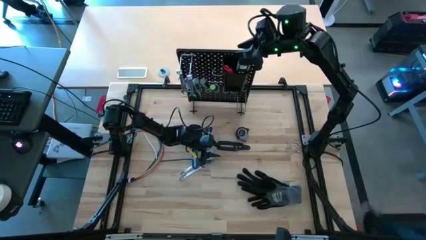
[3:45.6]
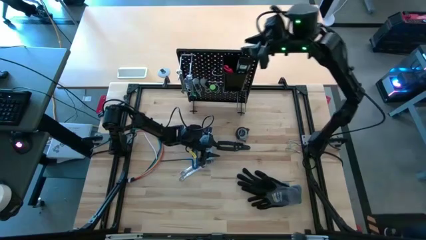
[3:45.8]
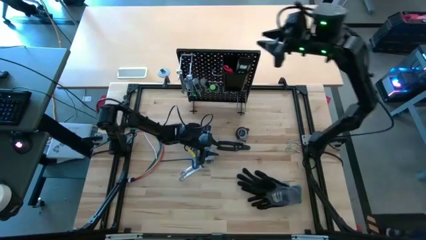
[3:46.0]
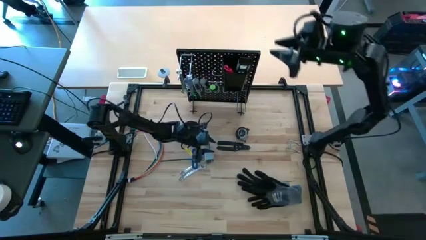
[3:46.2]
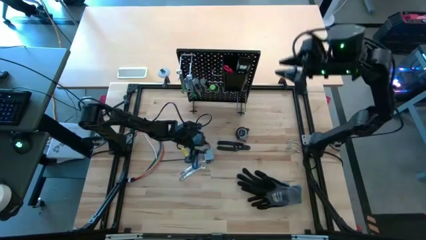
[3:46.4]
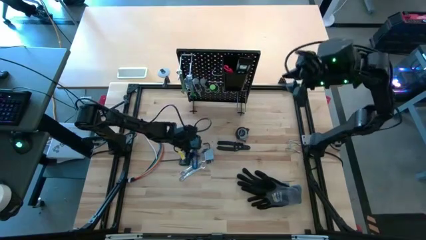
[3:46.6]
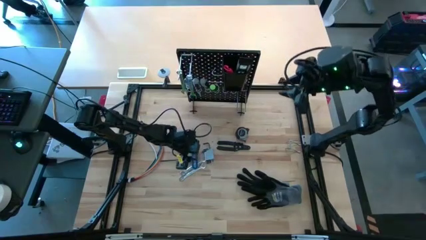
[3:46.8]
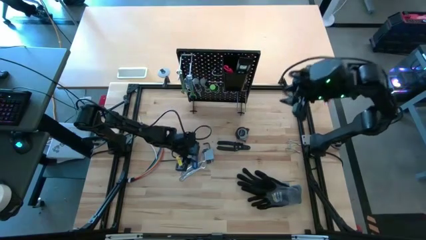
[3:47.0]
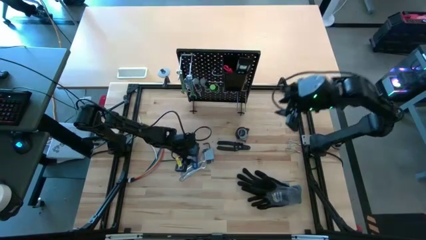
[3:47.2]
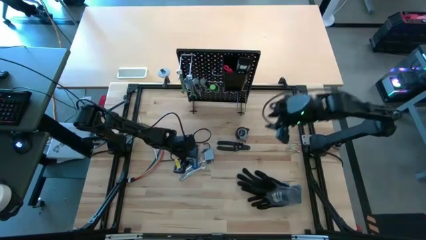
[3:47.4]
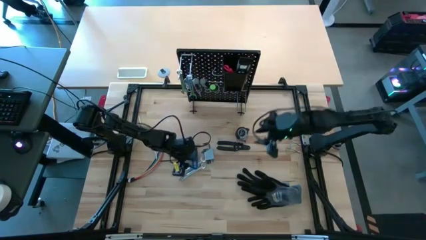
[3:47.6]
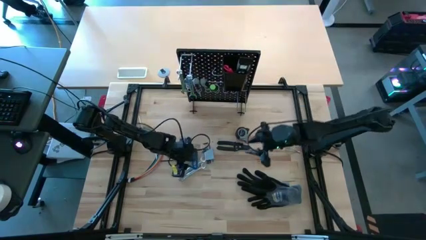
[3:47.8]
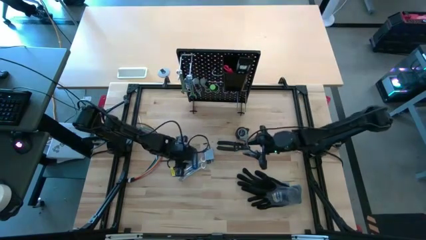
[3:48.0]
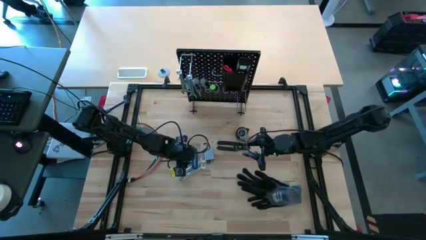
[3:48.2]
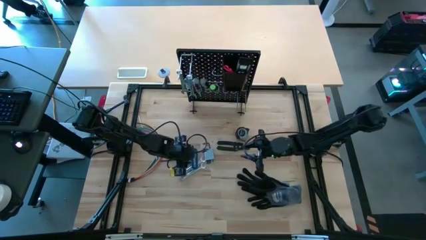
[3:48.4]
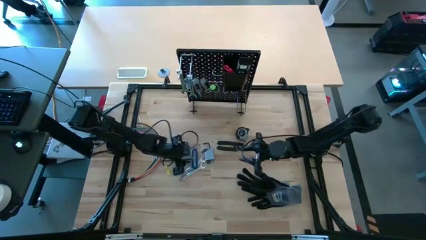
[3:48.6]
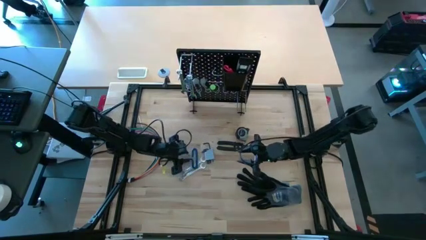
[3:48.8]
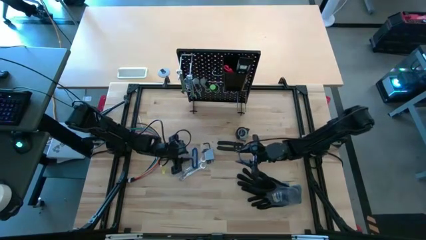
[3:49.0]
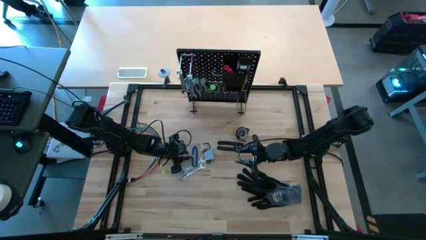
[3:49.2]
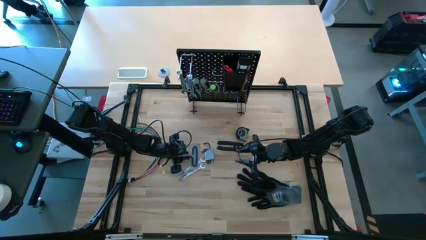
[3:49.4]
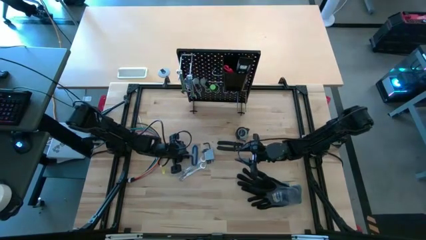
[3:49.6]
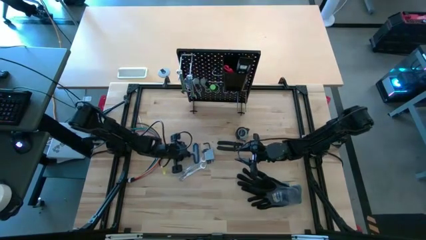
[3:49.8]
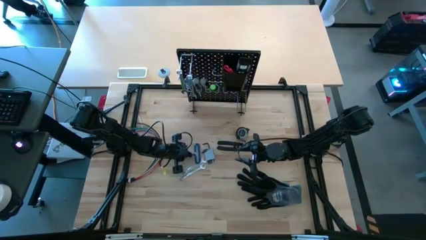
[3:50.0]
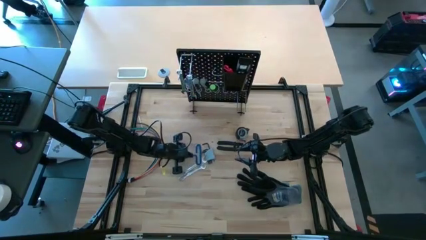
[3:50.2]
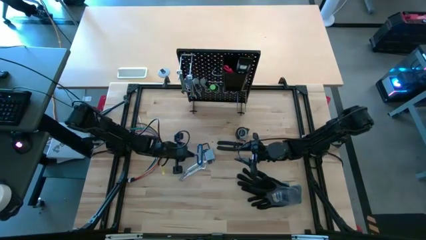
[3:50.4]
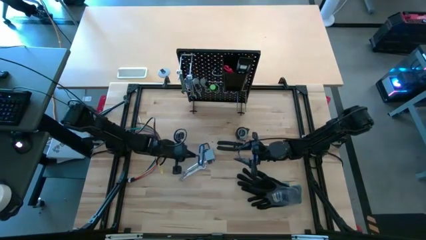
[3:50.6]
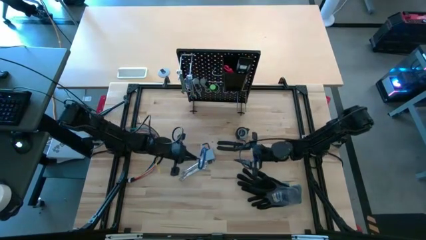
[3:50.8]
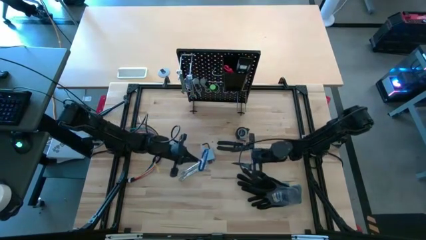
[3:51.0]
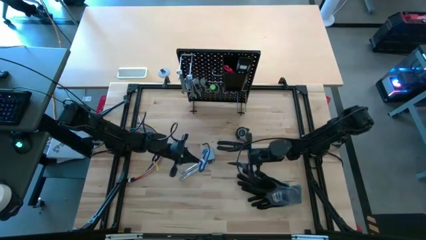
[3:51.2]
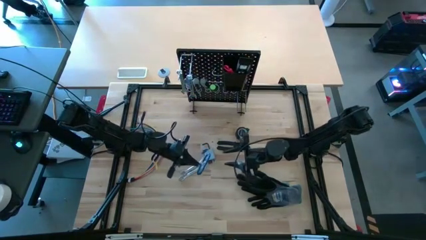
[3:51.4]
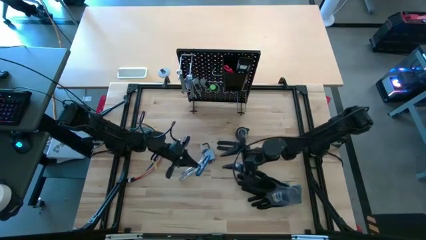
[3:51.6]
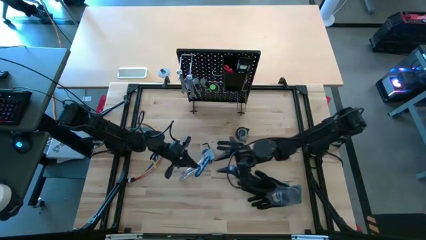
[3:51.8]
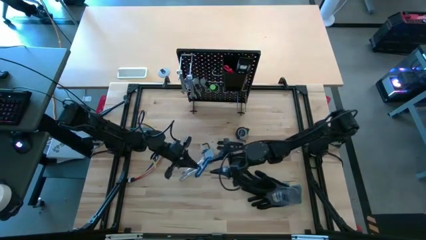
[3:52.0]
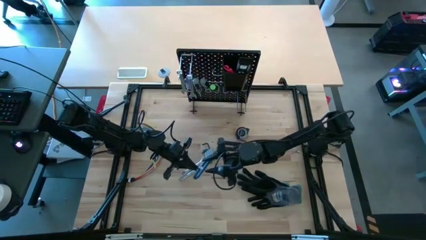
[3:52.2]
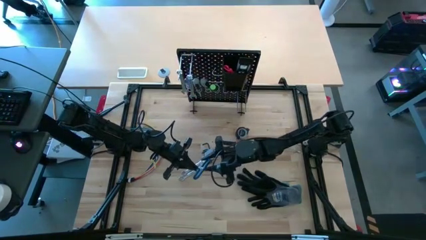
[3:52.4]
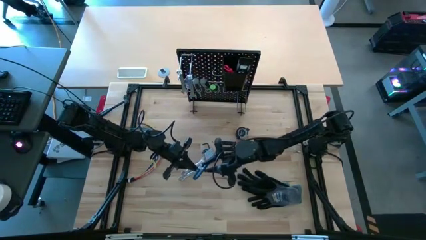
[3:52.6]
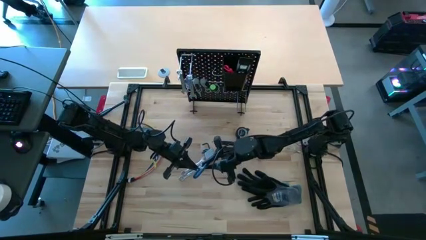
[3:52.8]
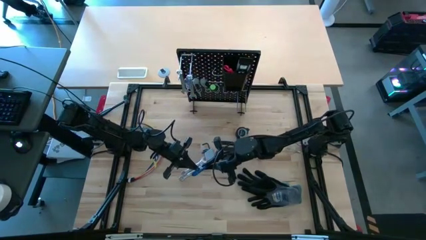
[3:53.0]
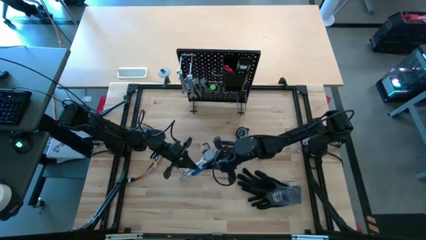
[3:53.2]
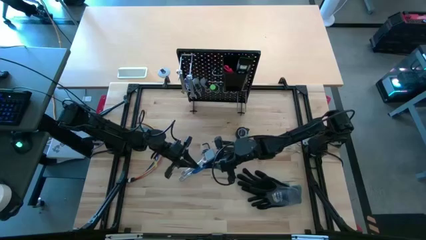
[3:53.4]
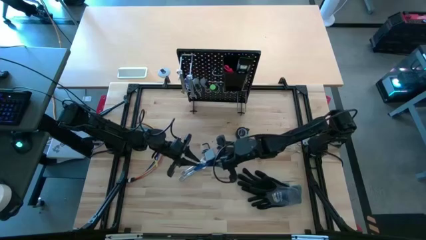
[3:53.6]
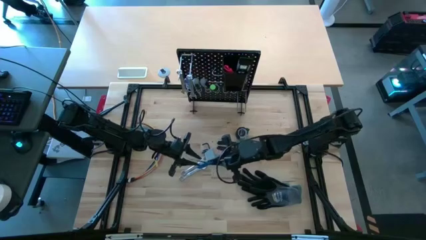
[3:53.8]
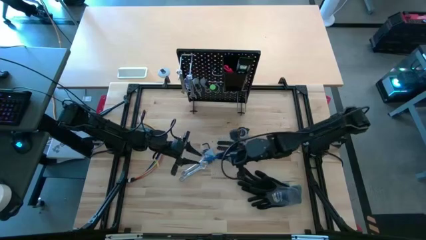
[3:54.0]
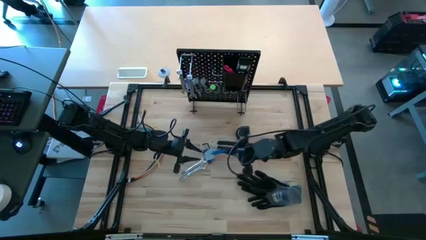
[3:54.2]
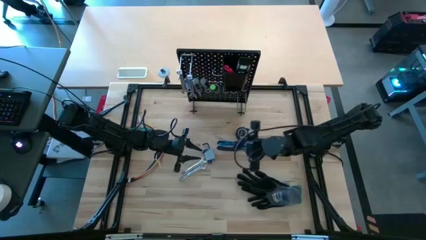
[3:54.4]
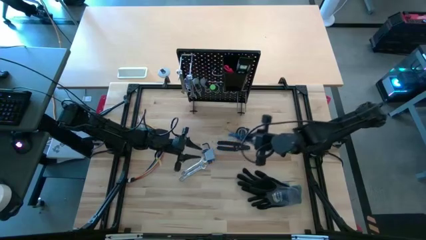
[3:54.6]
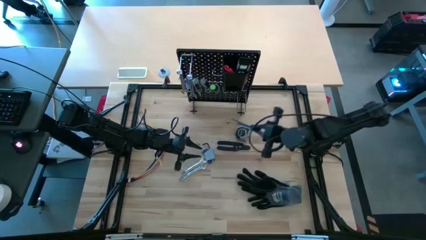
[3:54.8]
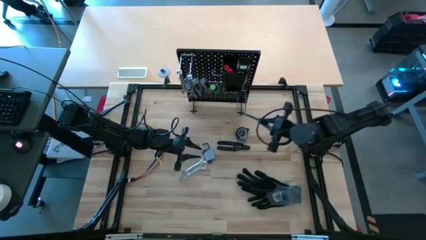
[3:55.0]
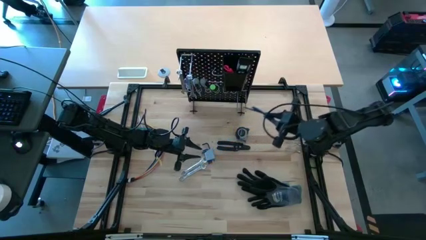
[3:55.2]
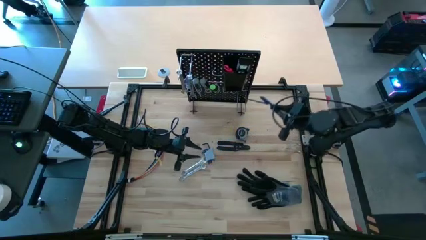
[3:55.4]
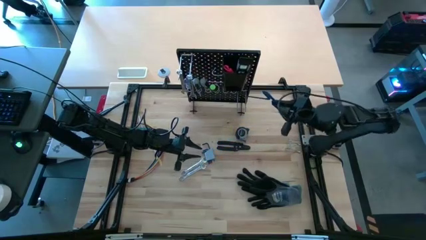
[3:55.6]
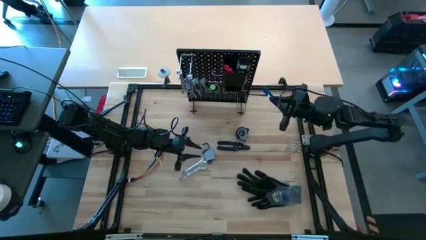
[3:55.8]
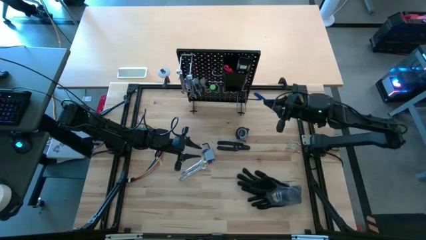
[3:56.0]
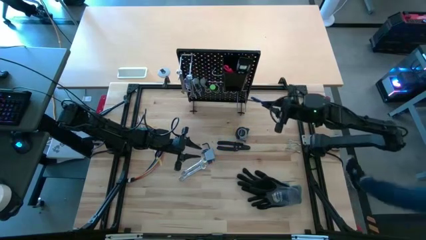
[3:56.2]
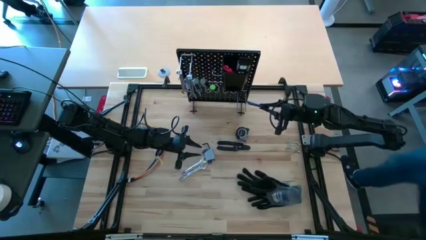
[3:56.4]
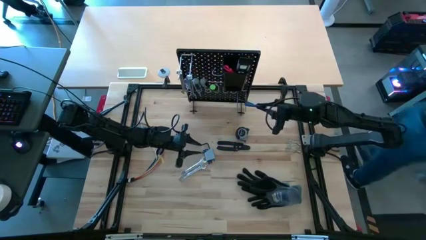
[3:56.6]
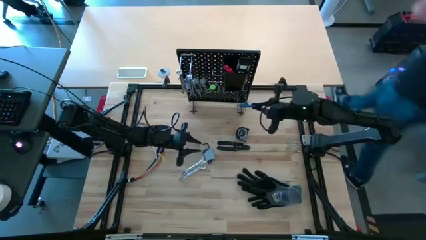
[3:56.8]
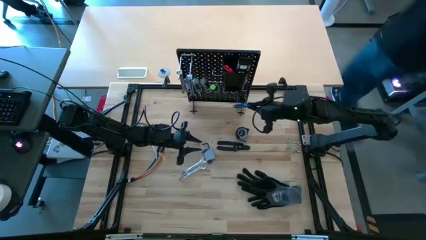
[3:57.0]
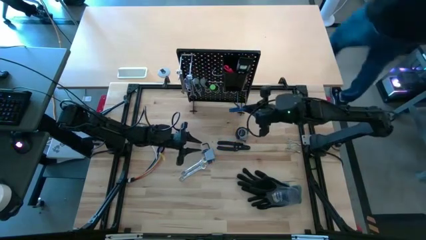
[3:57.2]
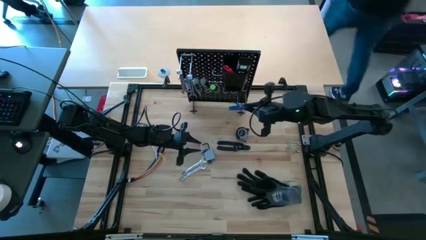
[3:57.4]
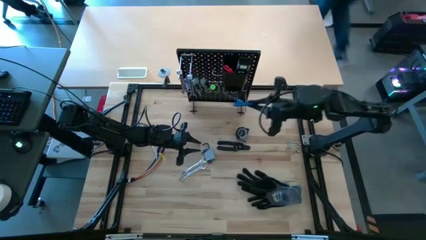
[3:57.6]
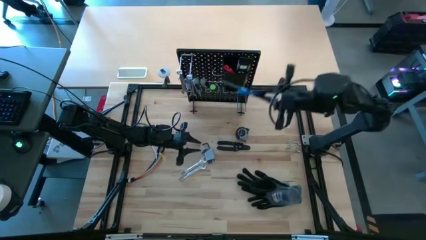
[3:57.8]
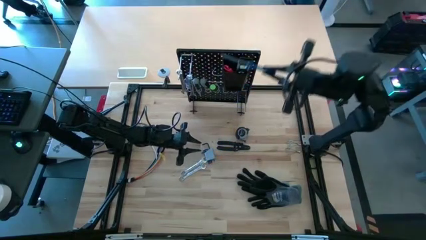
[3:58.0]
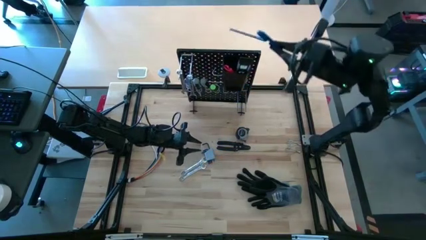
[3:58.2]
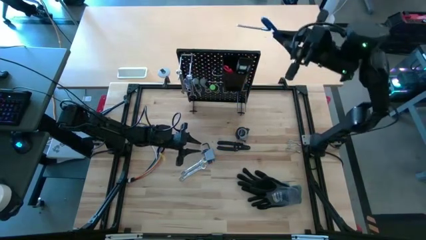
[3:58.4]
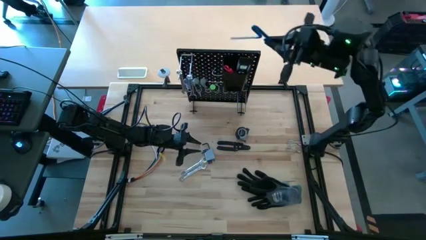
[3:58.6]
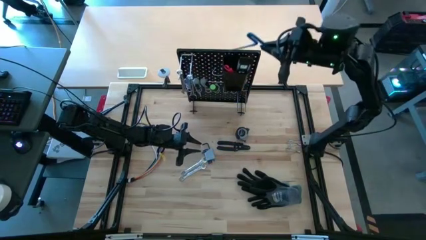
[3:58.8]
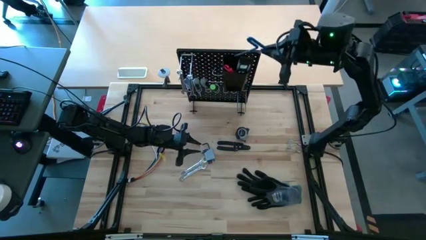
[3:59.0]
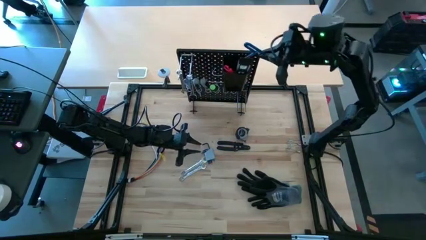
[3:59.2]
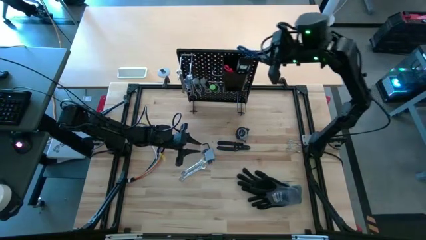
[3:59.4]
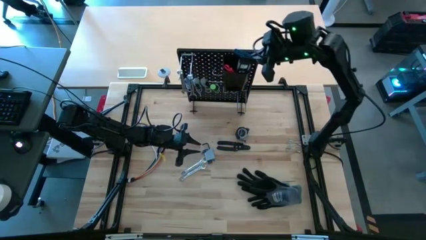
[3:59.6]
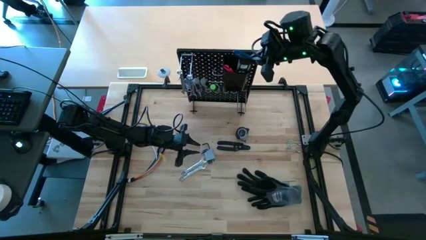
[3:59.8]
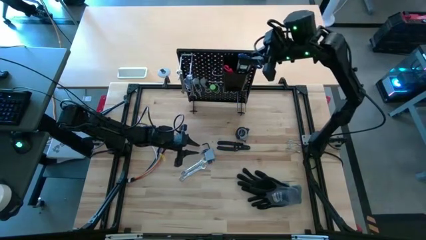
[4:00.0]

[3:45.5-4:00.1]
Task: Hang tools onto peg board
Put the blue pick tool into the black bin on the peg board
